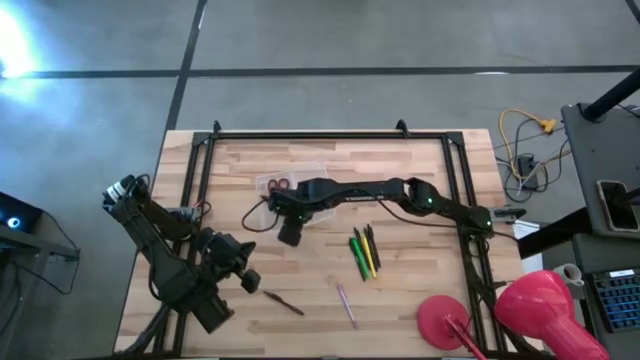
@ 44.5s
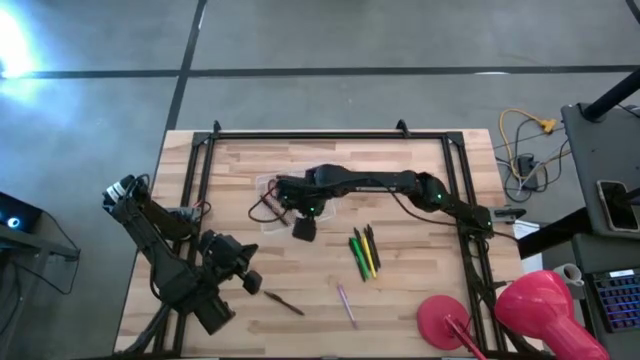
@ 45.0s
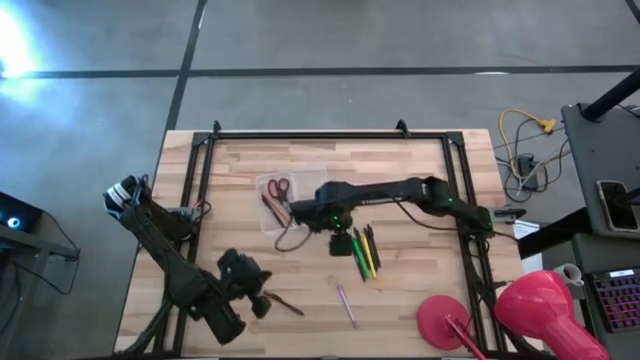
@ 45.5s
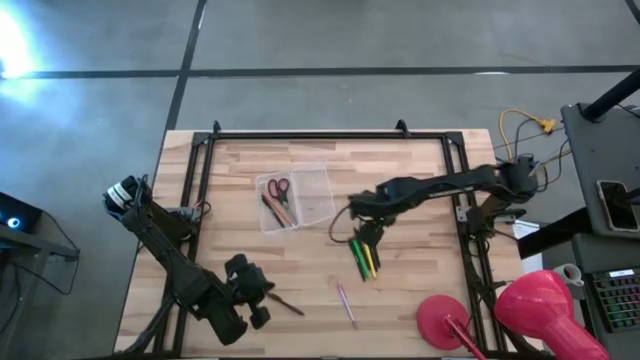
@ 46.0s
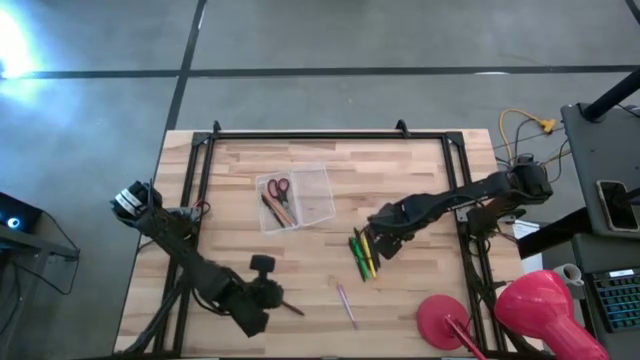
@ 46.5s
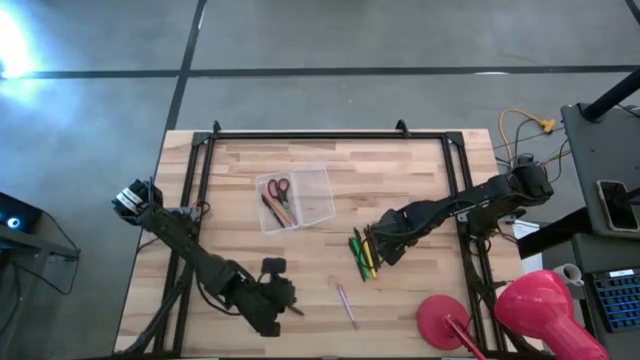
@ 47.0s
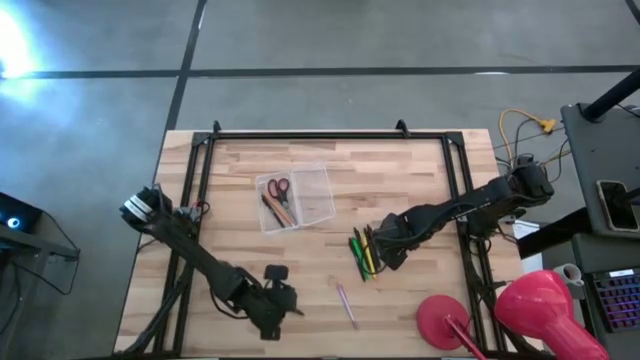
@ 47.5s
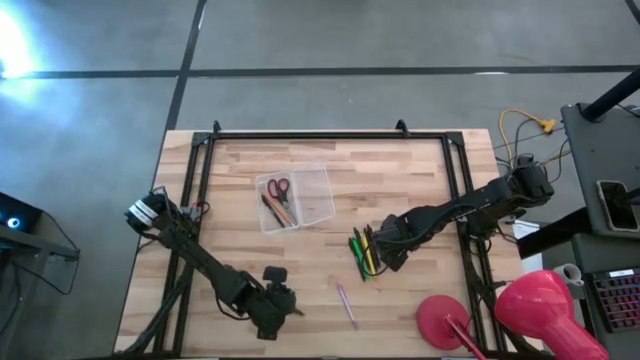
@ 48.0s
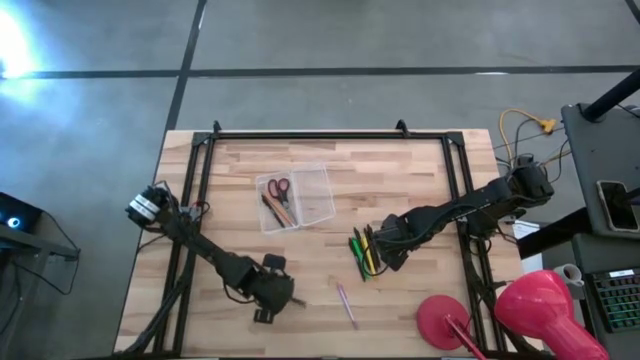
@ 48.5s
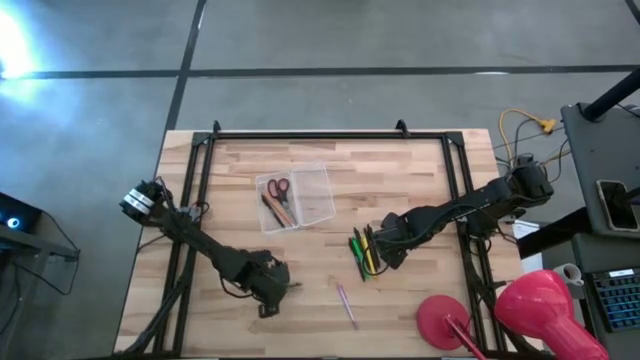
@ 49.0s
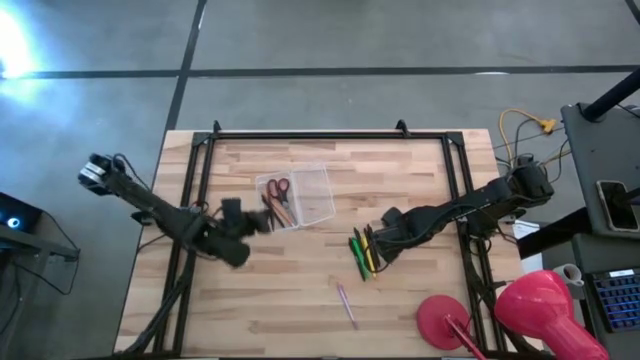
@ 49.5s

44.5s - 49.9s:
Task: Pick & place school supplies into a supply box
Put the brown pen into the transparent supply box

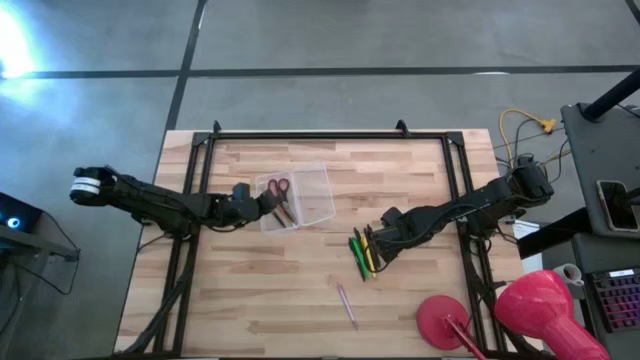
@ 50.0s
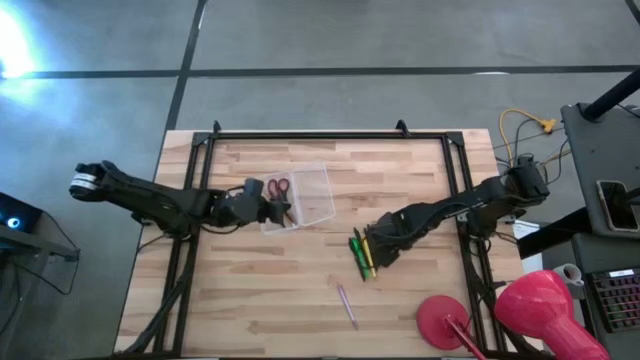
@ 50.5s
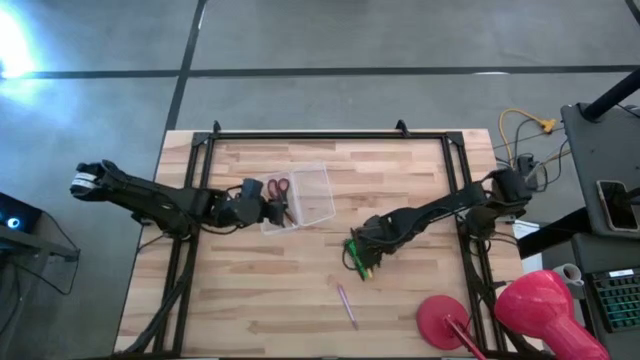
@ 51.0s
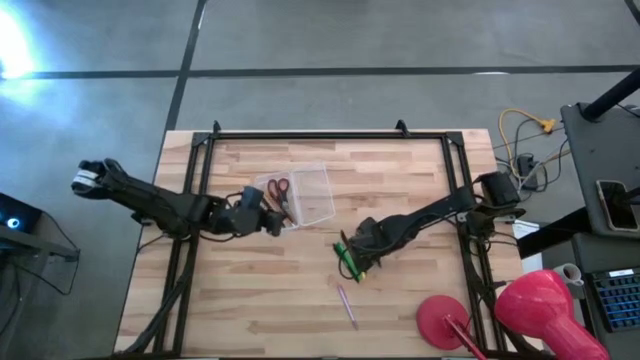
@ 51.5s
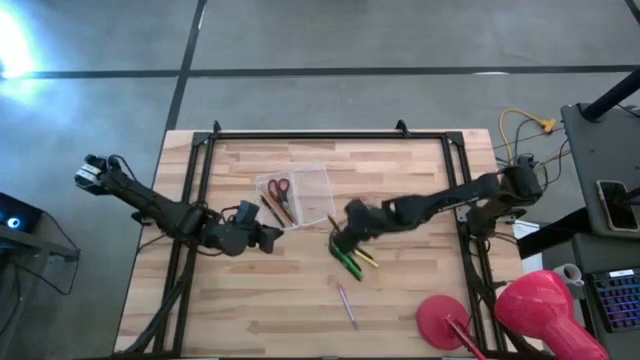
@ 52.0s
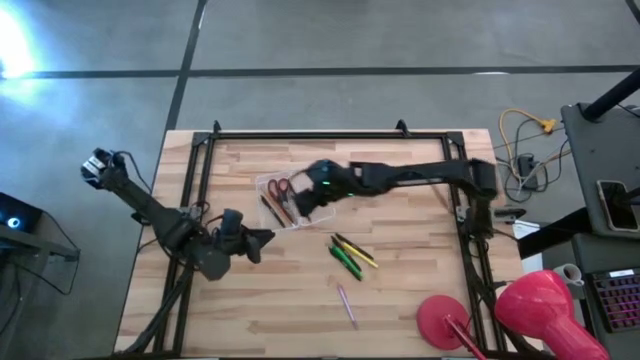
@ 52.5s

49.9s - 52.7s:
Put the black pen into the transparent supply box

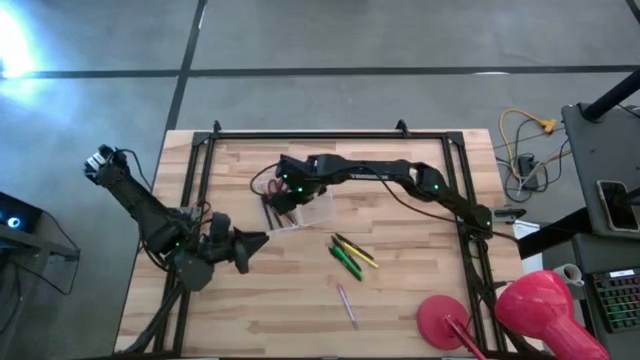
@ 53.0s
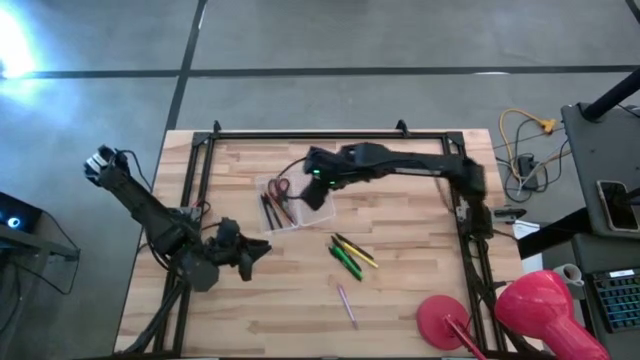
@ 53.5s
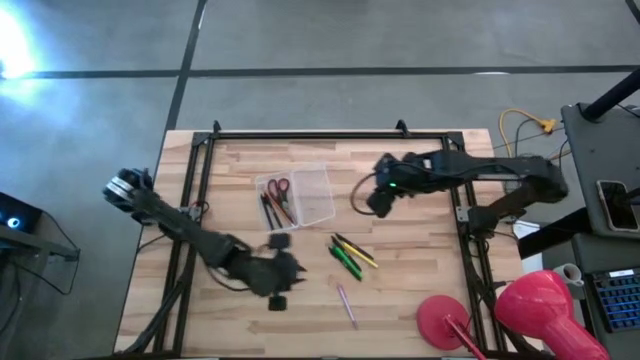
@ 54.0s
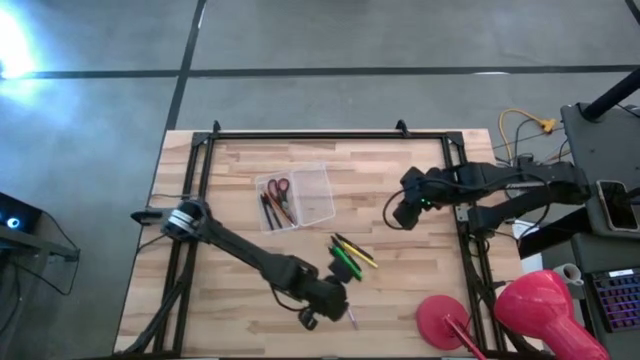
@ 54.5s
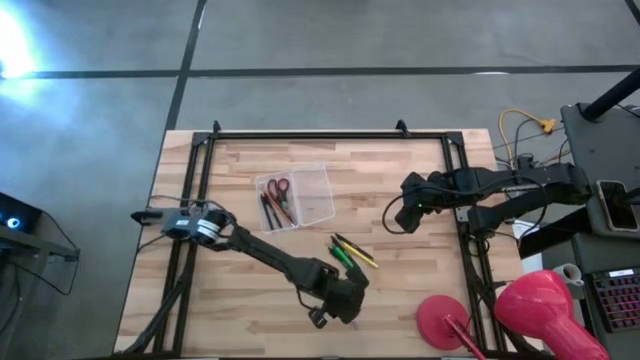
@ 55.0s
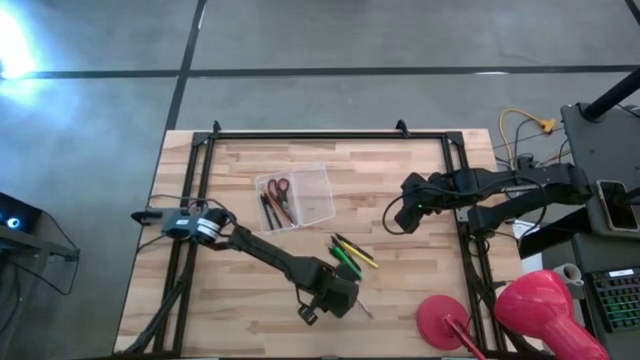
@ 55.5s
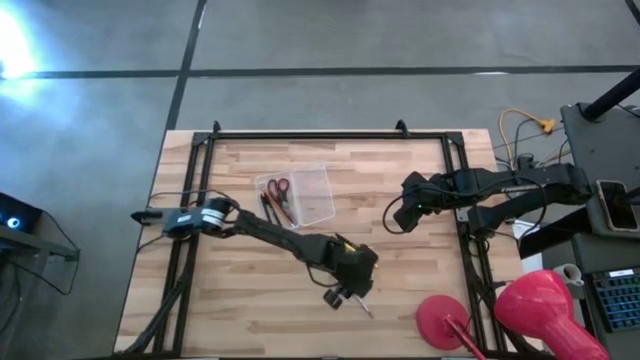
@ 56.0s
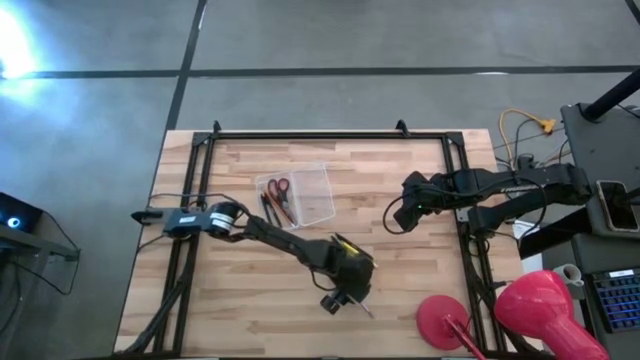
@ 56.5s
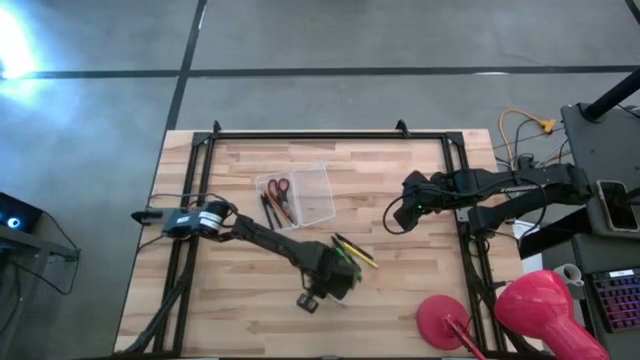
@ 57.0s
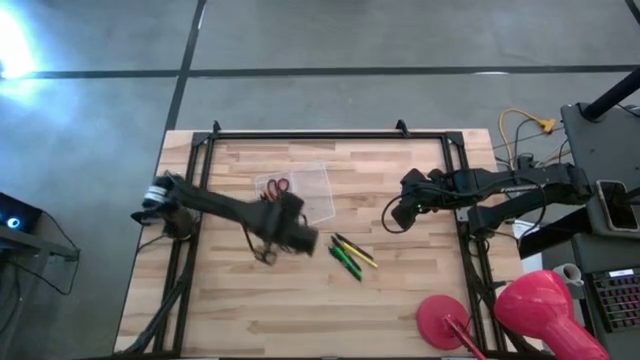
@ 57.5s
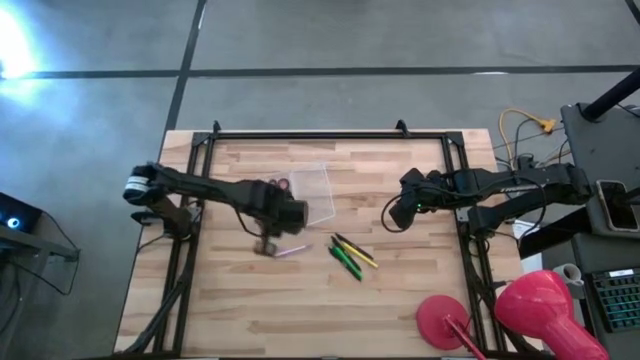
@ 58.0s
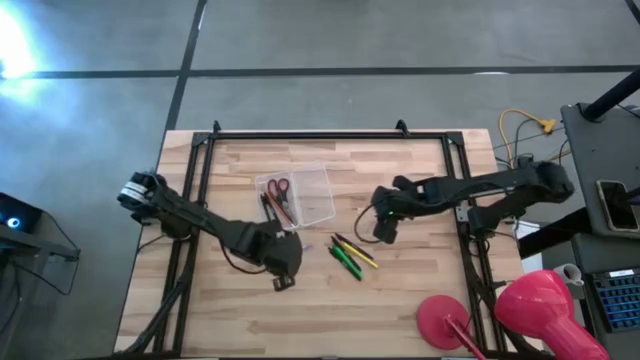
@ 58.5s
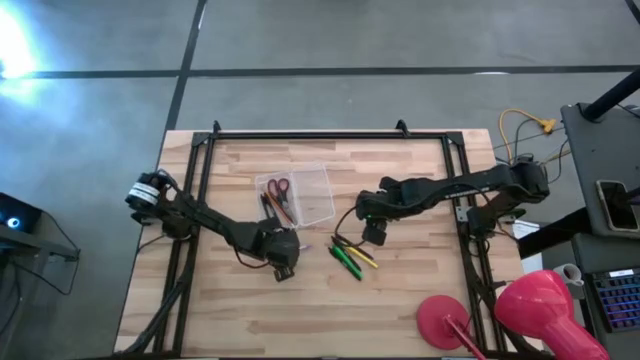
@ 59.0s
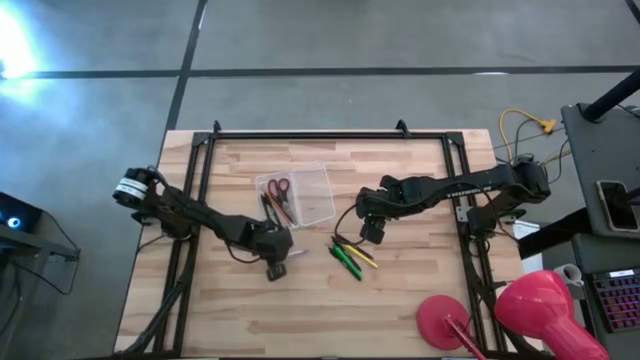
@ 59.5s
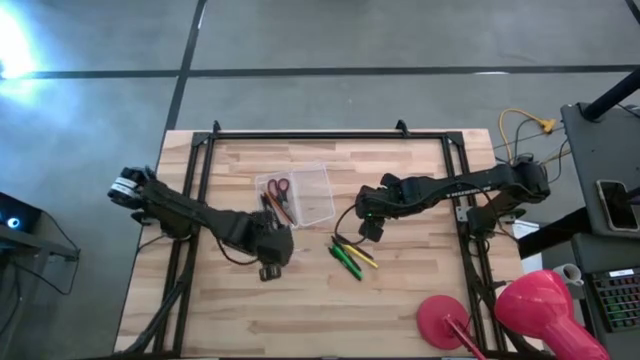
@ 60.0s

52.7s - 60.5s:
Put the violet pen into the transparent supply box

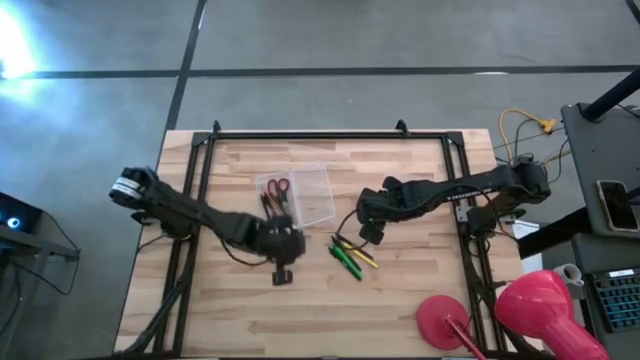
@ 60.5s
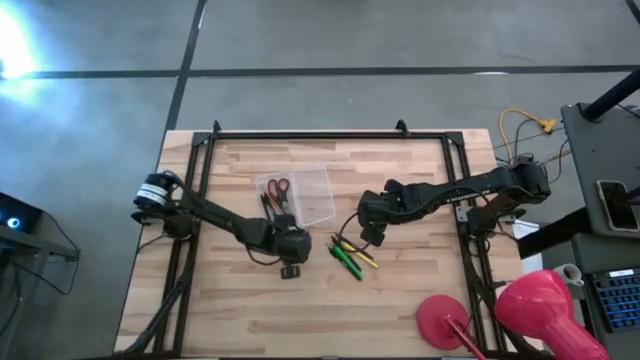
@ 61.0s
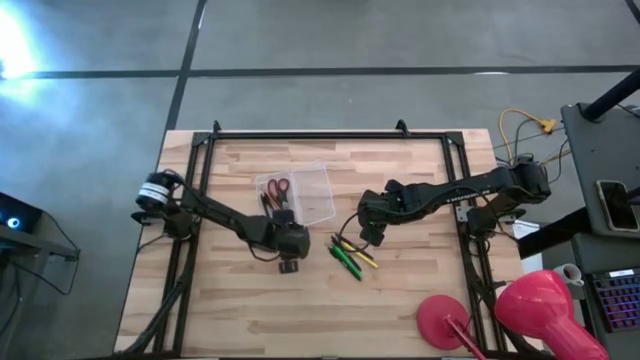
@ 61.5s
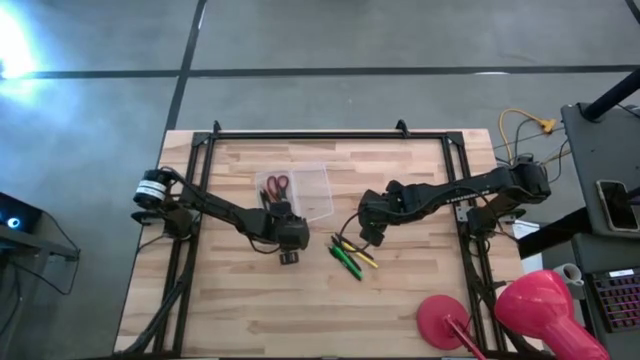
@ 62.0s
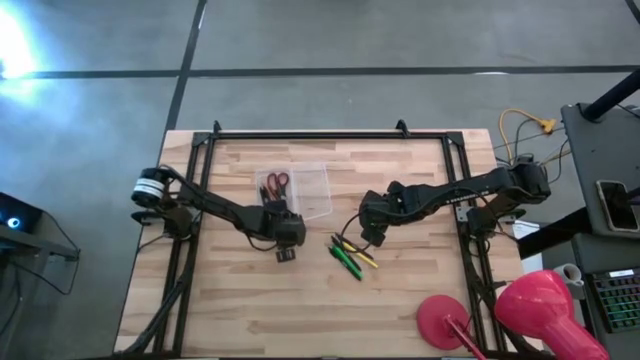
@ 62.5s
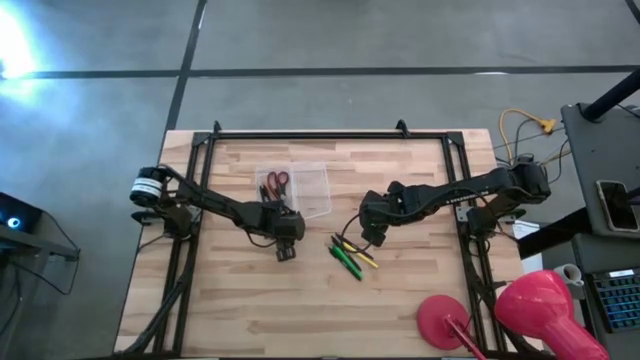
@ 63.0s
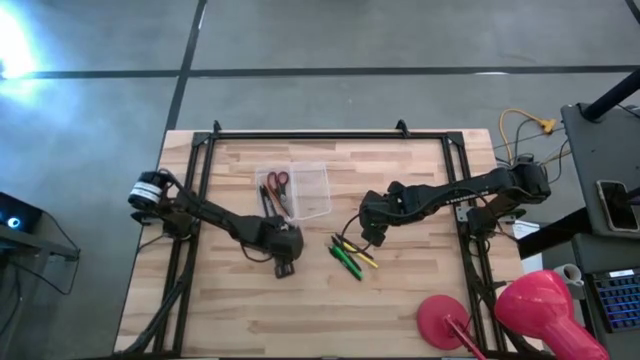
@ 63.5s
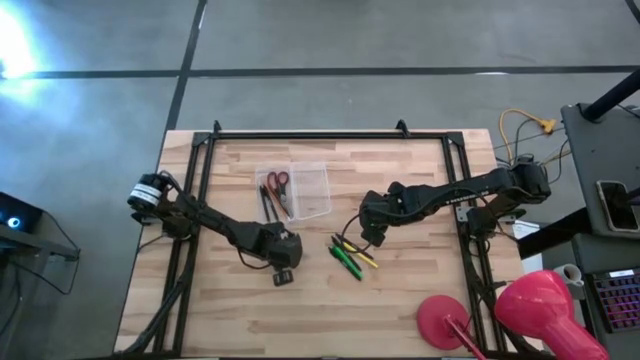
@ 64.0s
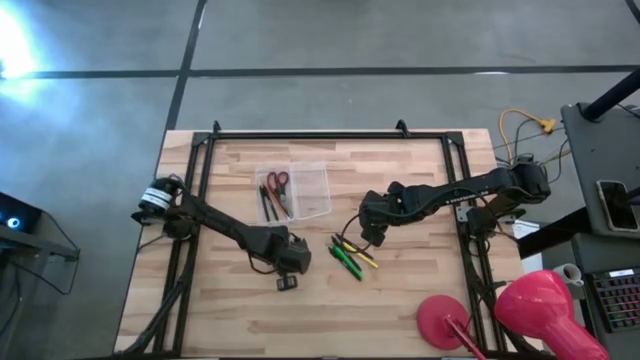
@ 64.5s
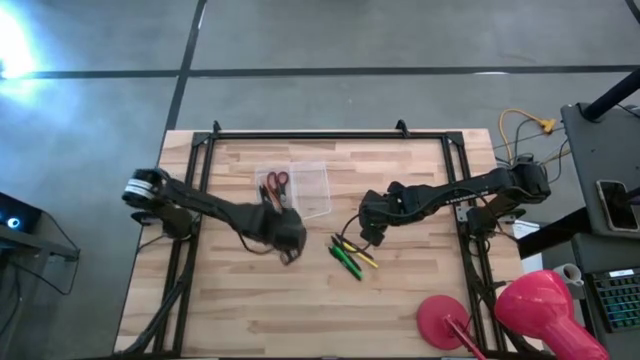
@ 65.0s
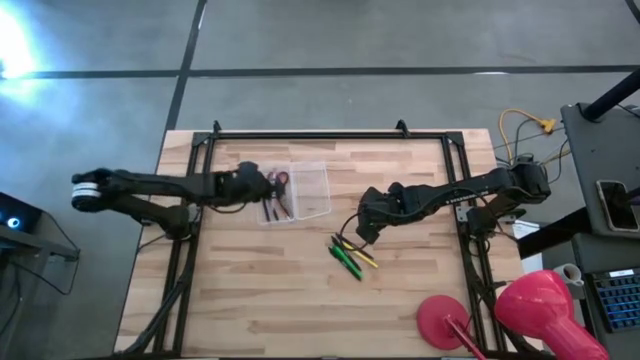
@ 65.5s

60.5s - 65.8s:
Put the violet pen into the transparent supply box
